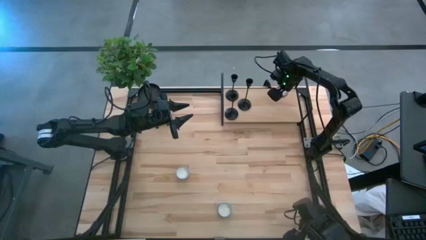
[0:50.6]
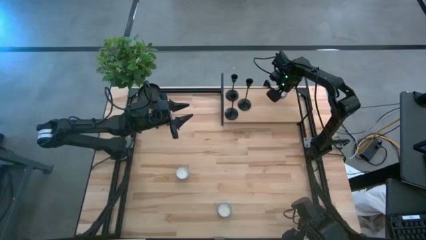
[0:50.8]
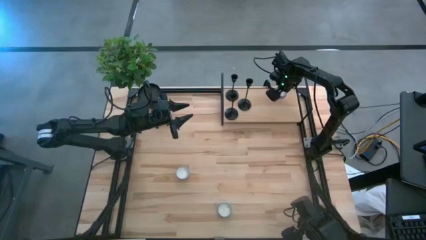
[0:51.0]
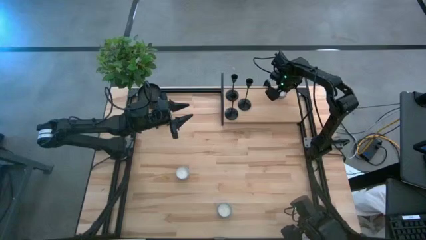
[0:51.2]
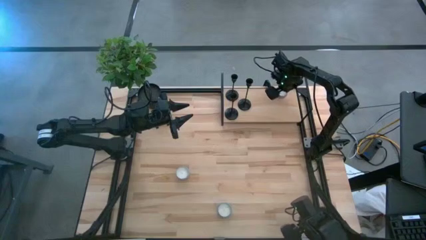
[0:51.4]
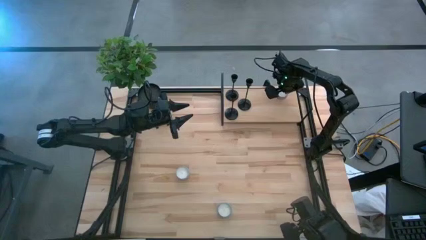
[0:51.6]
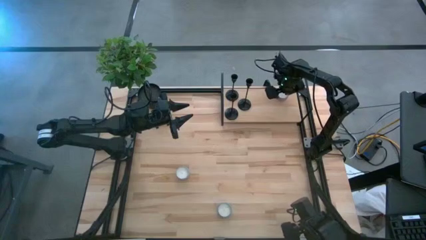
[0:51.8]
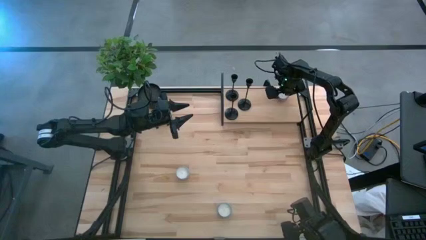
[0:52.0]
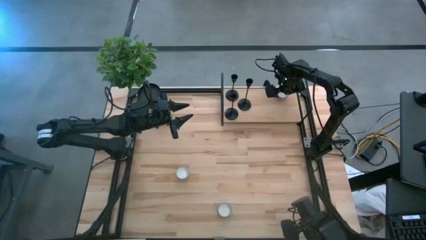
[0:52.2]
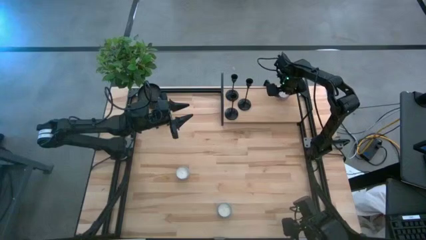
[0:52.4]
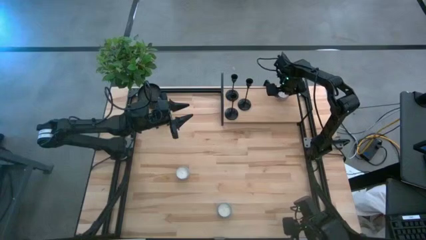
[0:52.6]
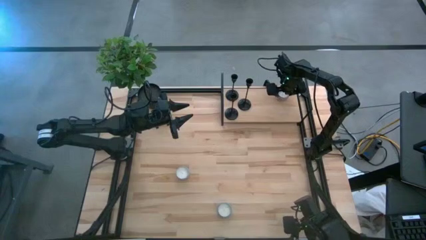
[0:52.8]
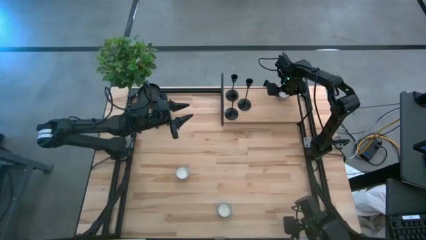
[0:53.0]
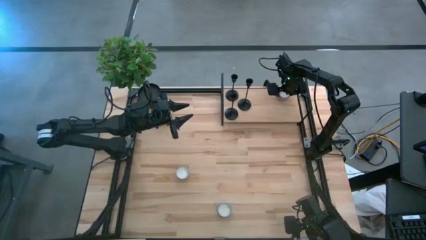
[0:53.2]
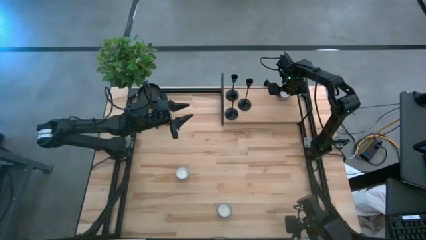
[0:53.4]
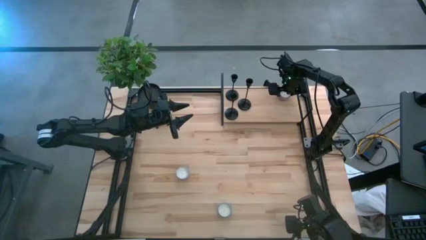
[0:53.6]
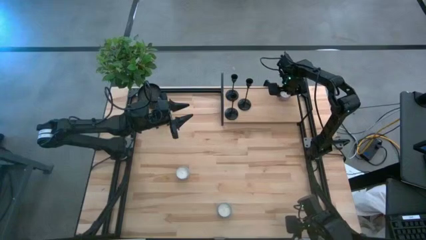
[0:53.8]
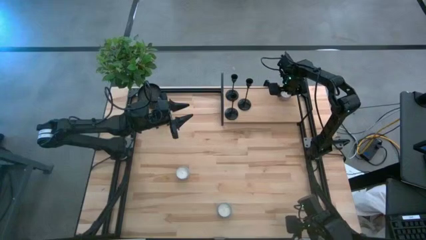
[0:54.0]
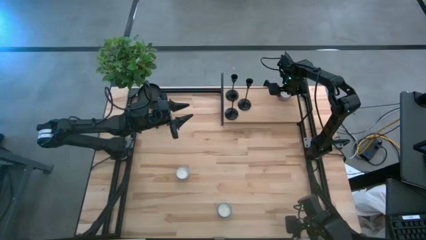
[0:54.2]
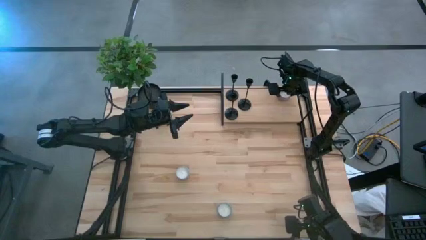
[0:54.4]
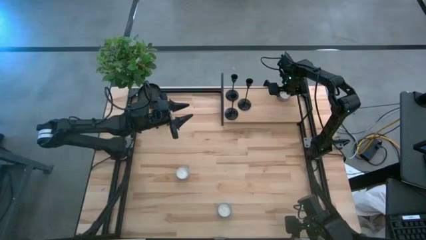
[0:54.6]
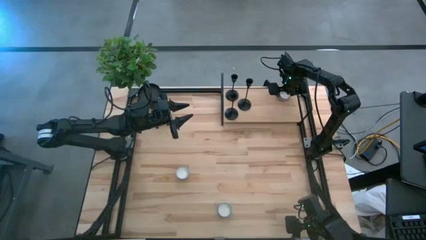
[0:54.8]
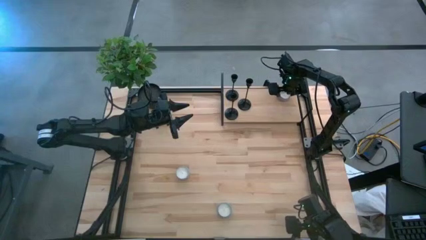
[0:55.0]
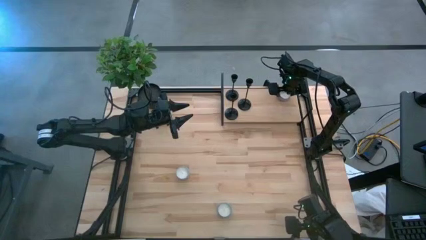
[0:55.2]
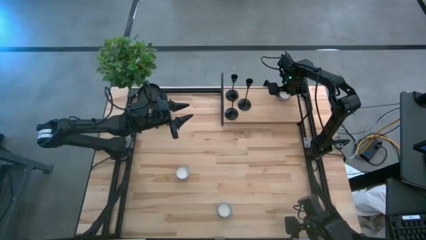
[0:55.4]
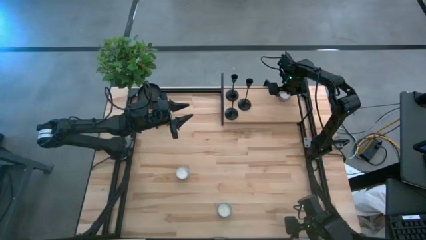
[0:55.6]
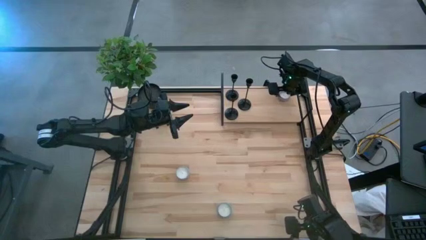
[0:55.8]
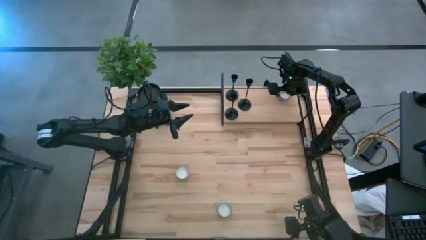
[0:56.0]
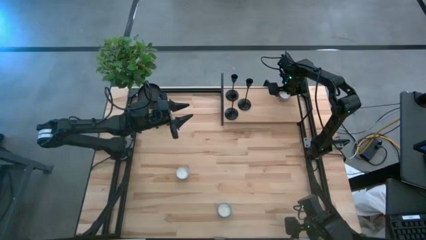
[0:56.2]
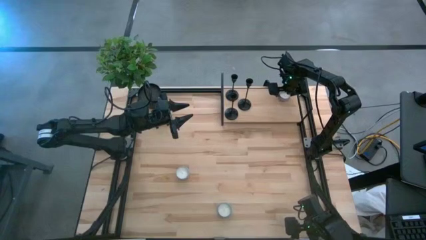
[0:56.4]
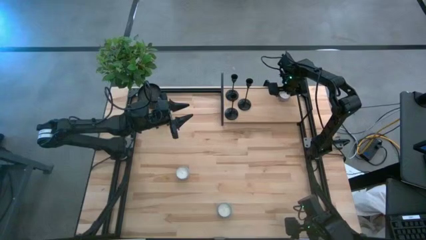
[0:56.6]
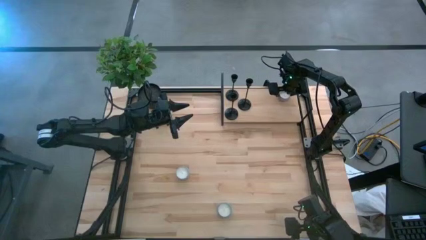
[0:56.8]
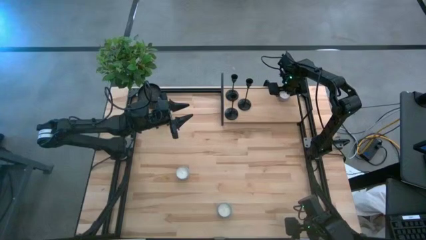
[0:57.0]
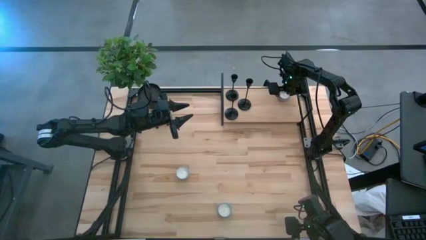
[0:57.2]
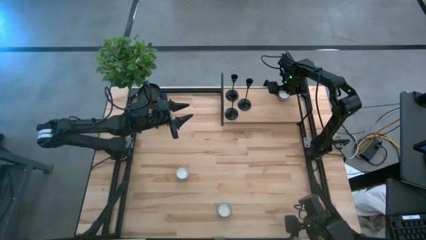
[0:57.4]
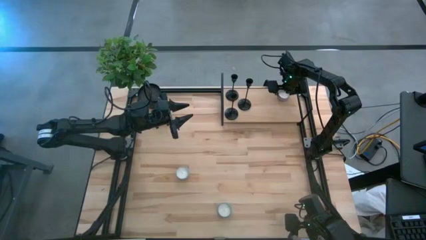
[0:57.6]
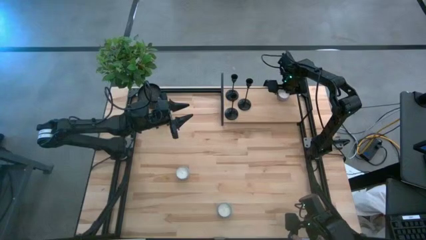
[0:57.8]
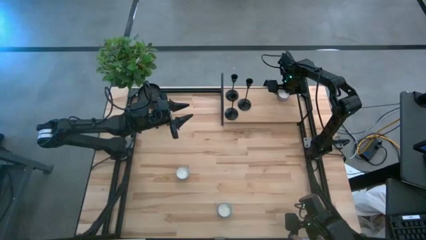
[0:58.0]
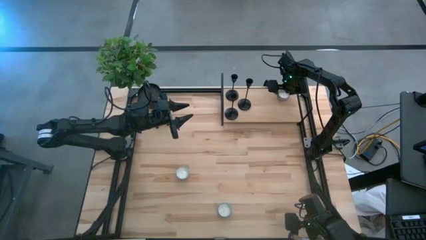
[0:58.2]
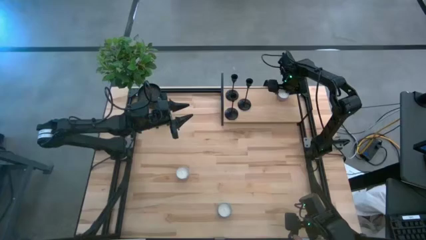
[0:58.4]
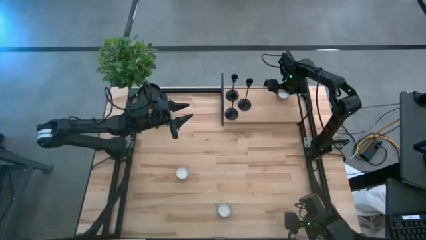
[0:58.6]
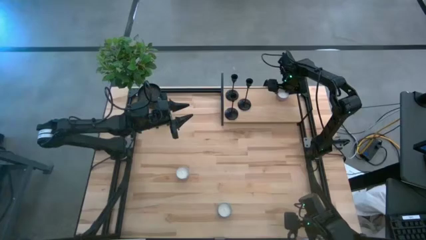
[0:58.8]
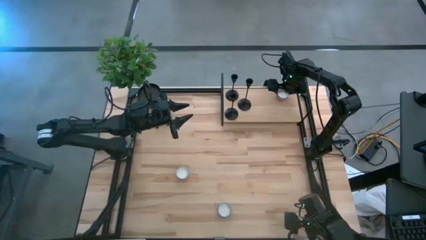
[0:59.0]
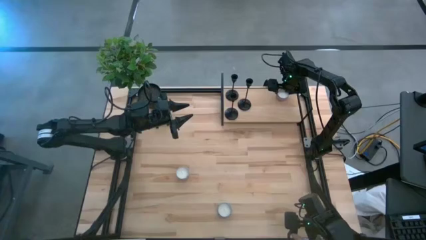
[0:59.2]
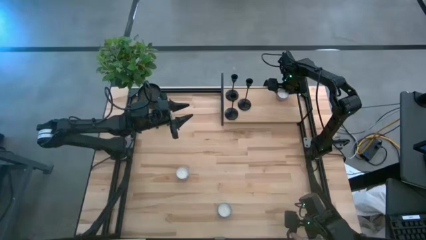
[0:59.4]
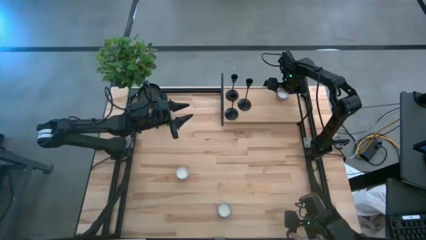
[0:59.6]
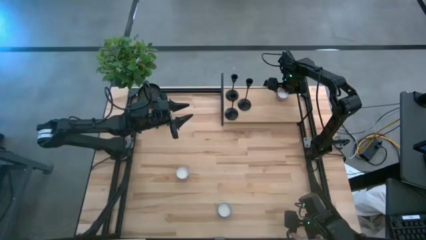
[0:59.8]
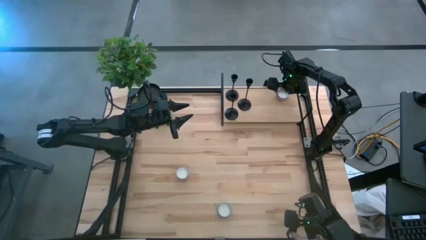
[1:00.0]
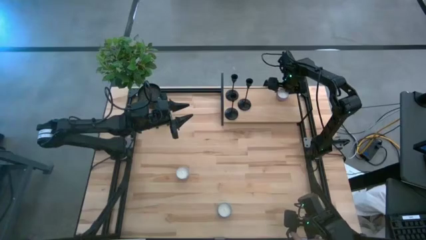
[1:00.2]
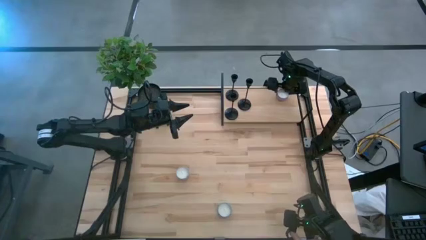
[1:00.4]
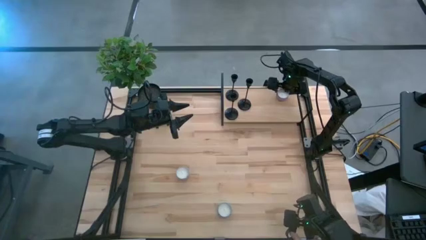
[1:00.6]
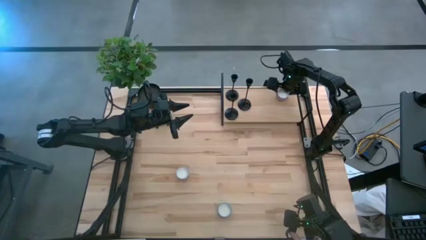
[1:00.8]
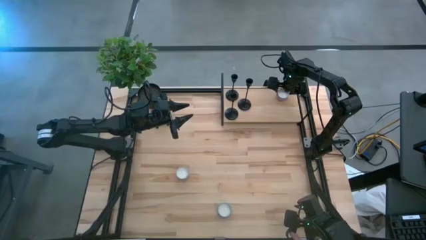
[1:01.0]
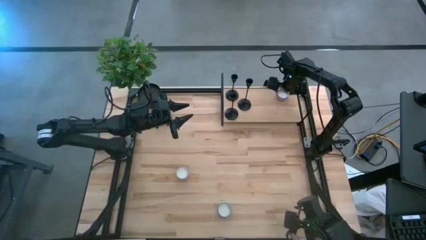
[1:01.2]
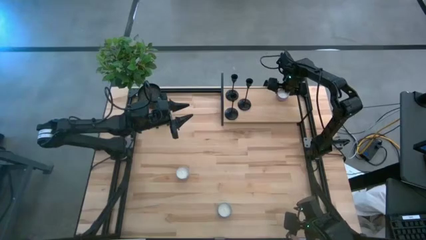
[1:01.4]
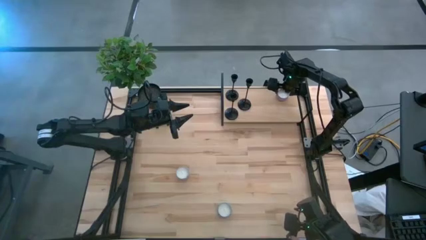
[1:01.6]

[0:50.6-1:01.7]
Task: Pick & Place candle stick holders
Put the top right pink scented candle on the shelf

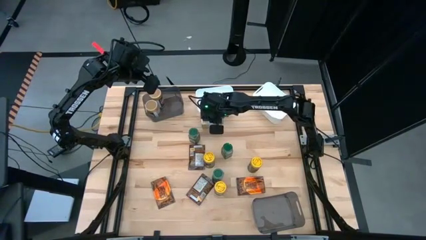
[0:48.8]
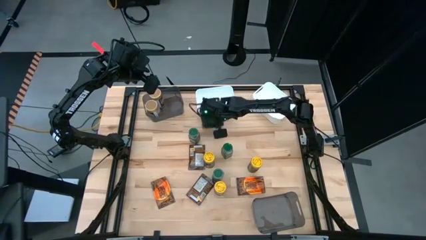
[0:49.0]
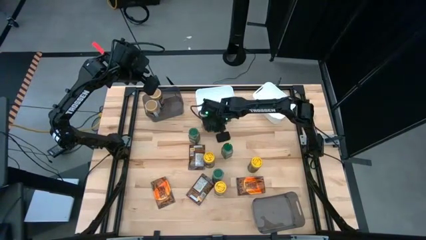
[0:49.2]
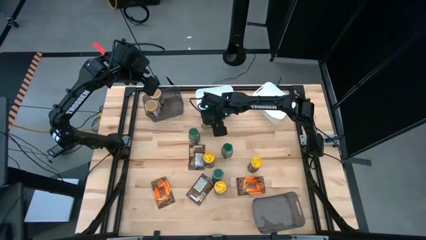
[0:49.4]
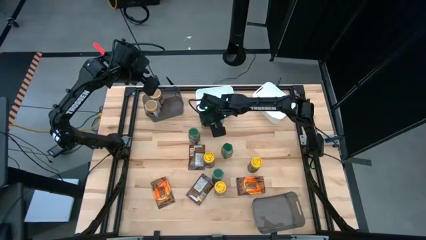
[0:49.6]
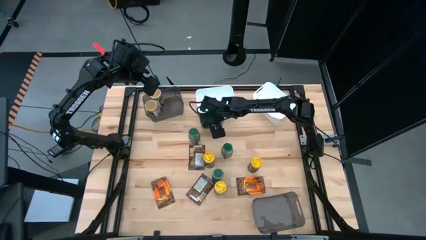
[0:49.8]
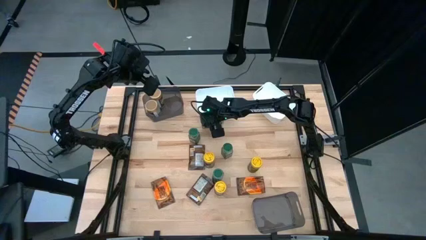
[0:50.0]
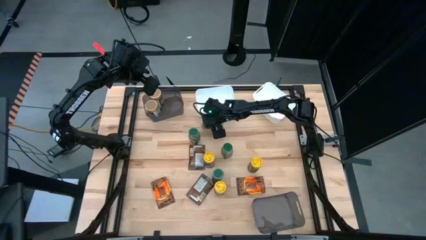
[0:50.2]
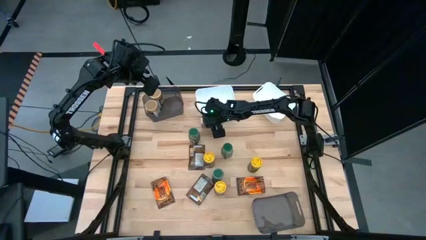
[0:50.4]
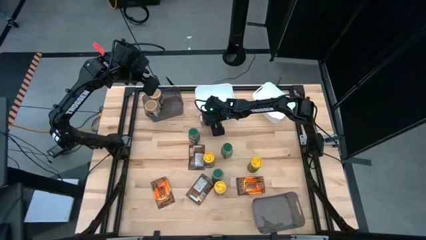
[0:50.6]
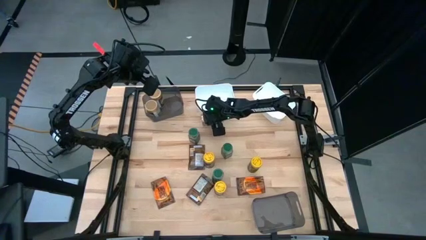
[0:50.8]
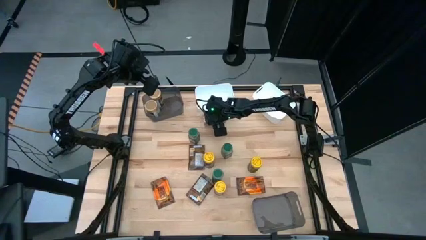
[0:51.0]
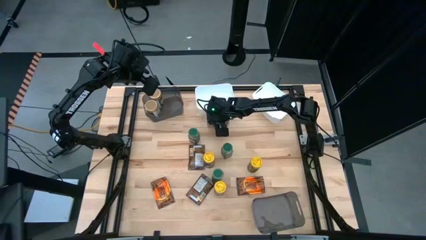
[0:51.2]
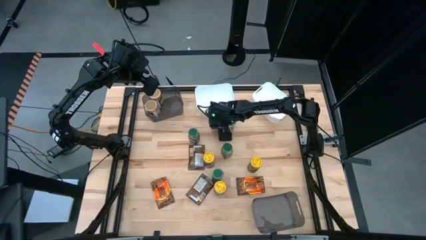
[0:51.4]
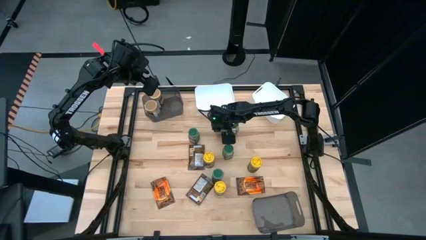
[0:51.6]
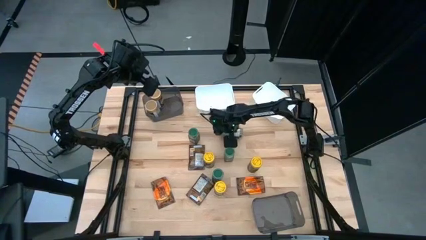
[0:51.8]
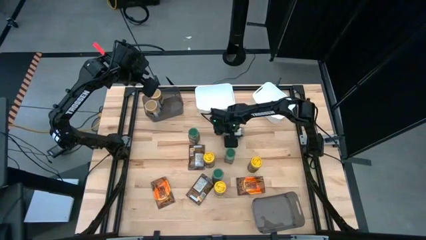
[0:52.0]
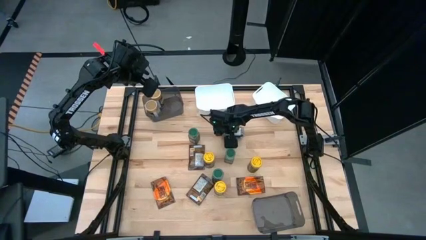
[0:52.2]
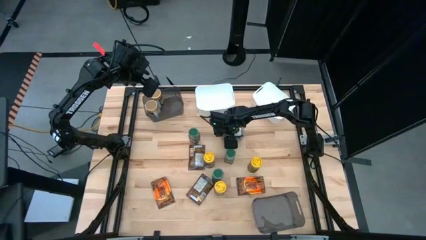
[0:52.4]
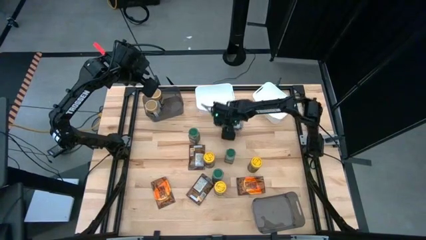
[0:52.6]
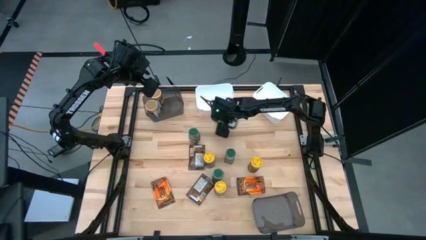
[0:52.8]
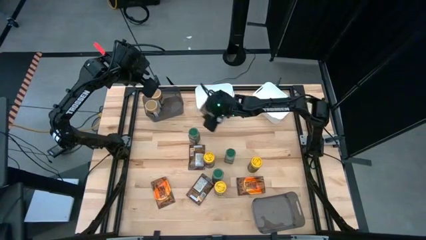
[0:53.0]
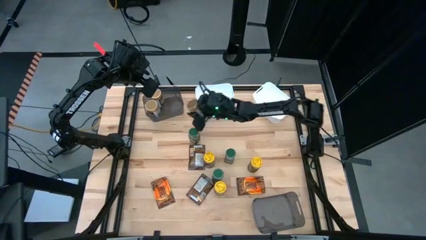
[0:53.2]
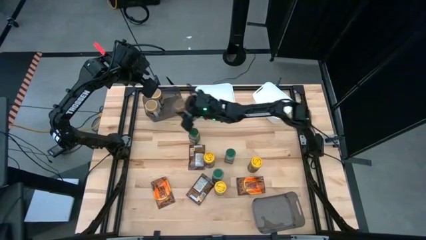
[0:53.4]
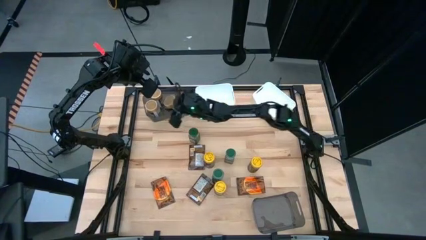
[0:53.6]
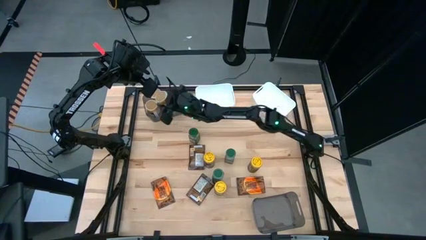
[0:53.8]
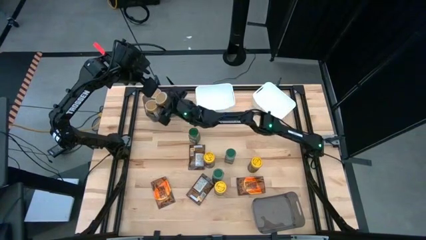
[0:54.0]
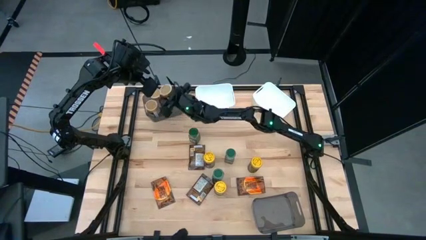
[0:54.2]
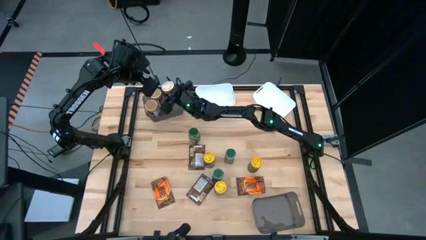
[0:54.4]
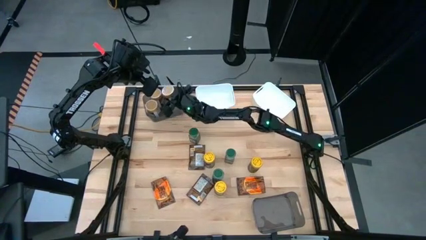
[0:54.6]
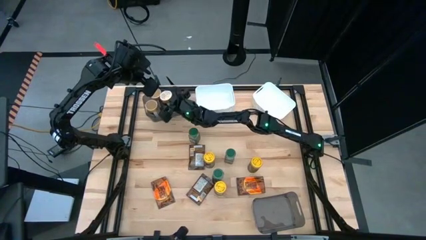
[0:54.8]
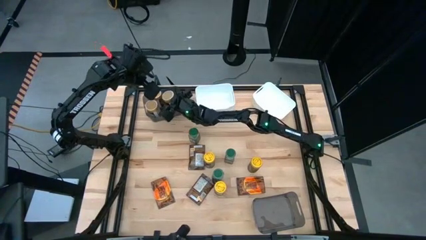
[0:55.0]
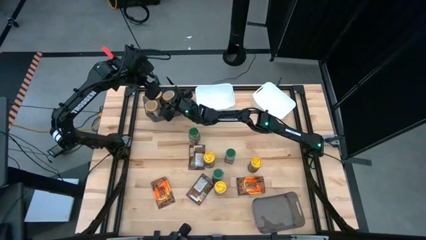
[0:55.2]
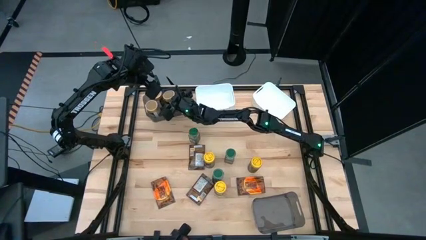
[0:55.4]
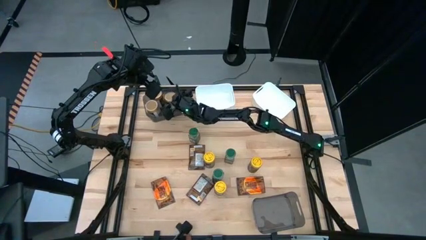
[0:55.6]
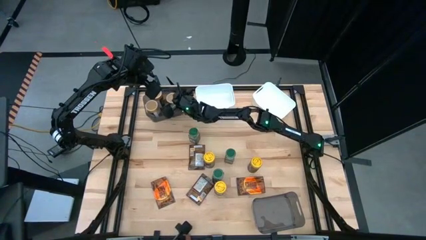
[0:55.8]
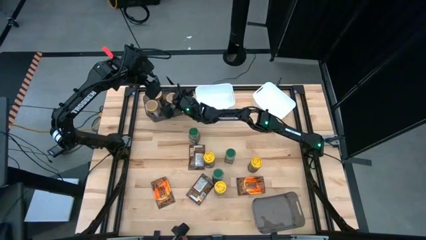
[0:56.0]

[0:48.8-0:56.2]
Task: Sort spices by type
Put the gold seasoning bottle into the top black bin
